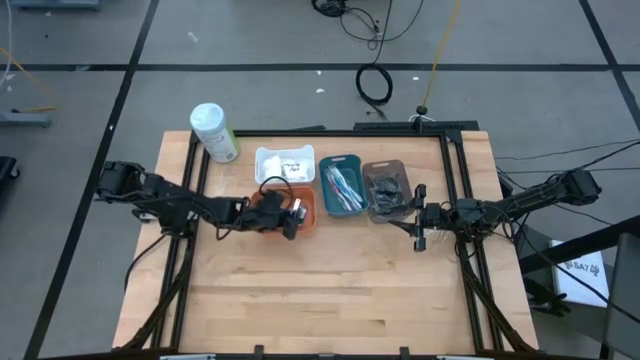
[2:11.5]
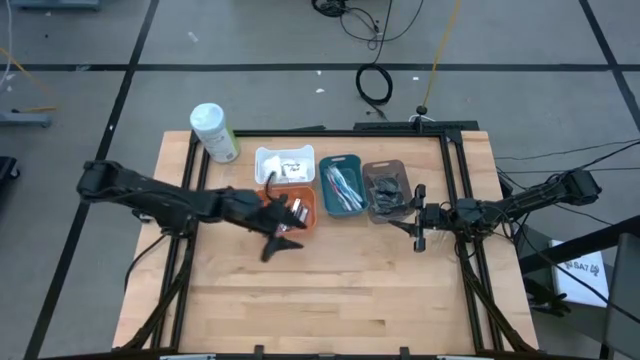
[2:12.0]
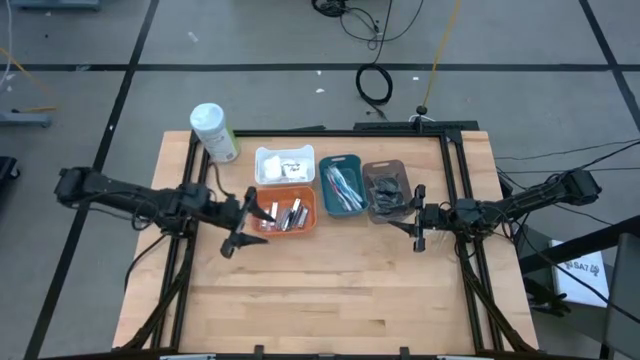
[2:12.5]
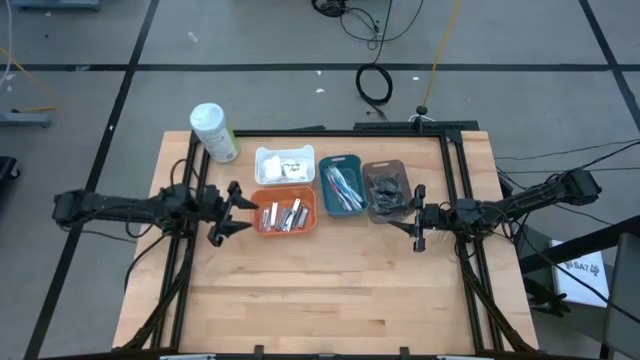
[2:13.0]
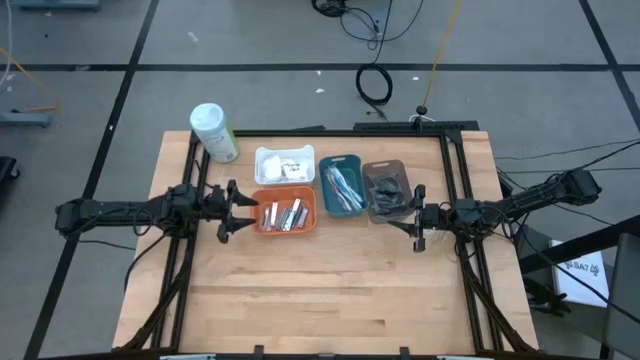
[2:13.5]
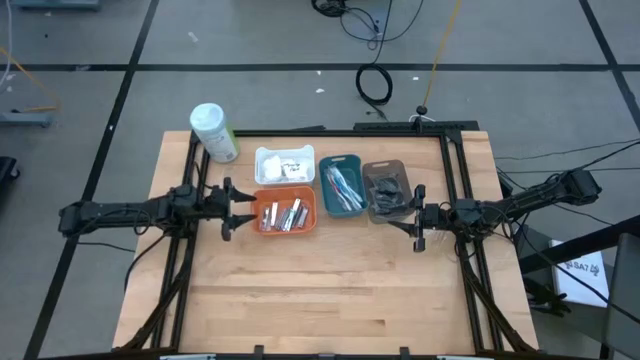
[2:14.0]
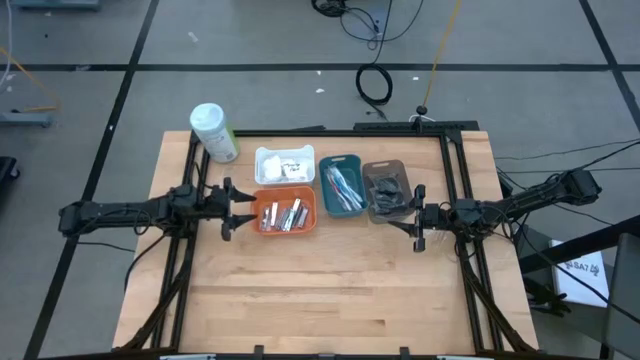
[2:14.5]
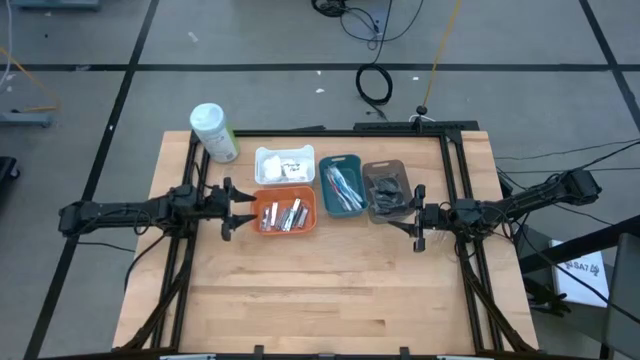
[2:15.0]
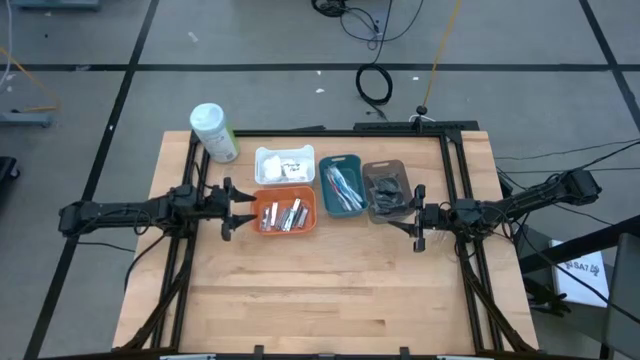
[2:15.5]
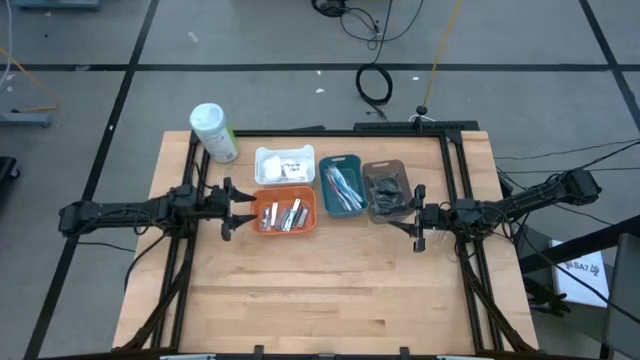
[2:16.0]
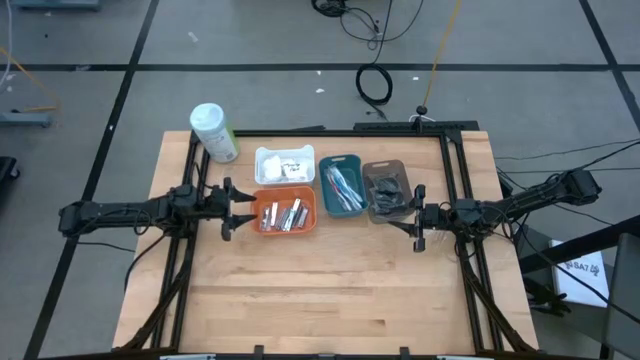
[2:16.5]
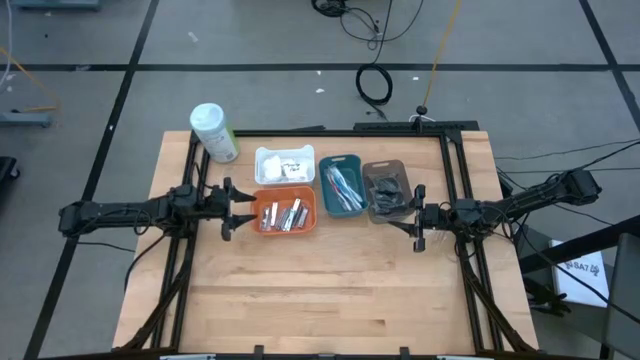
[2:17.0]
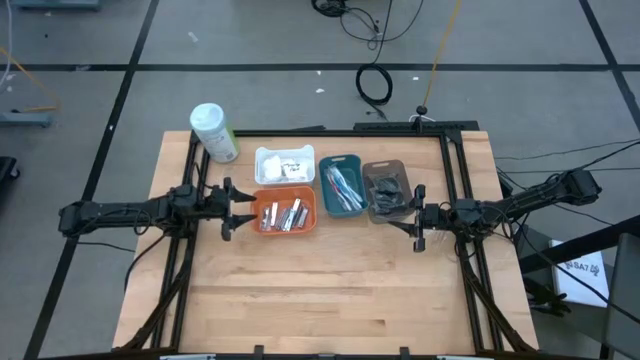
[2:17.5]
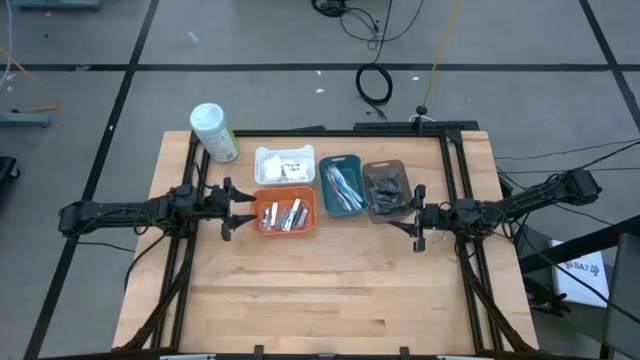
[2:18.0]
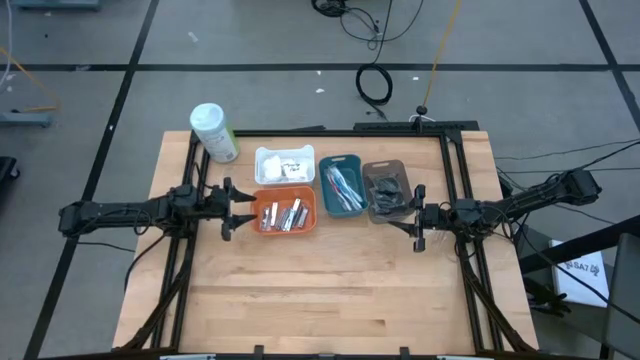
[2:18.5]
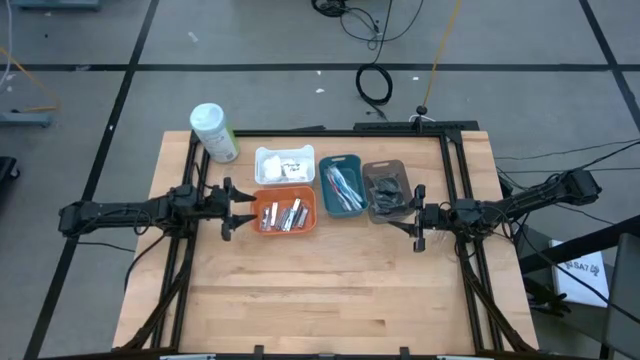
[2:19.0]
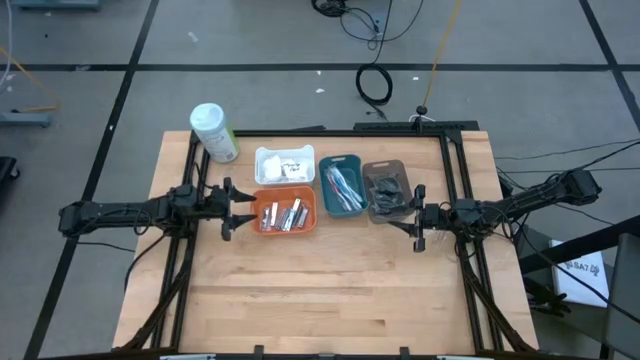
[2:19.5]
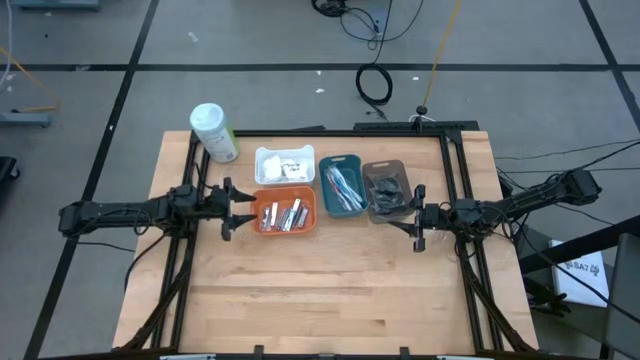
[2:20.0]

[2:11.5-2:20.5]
Task: Pick & Place Travel size toiletries
Return to Home Position

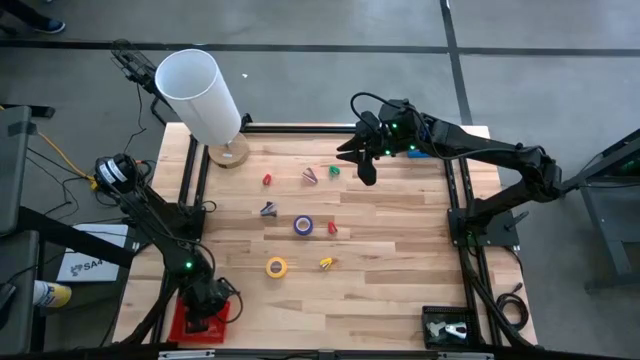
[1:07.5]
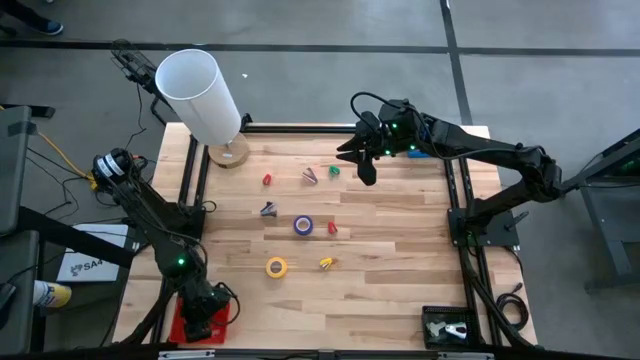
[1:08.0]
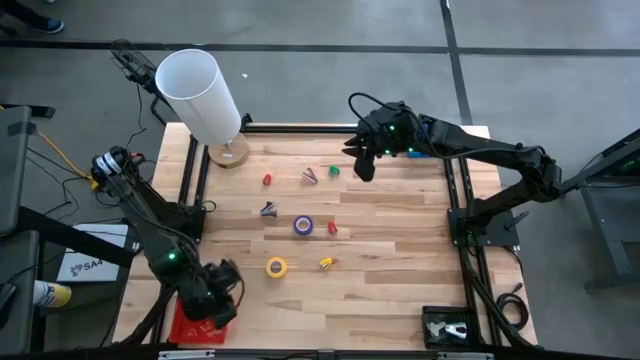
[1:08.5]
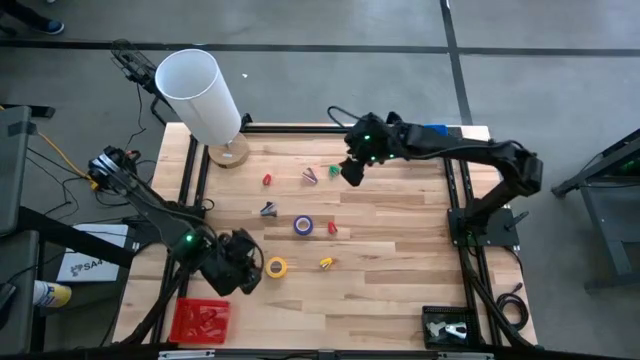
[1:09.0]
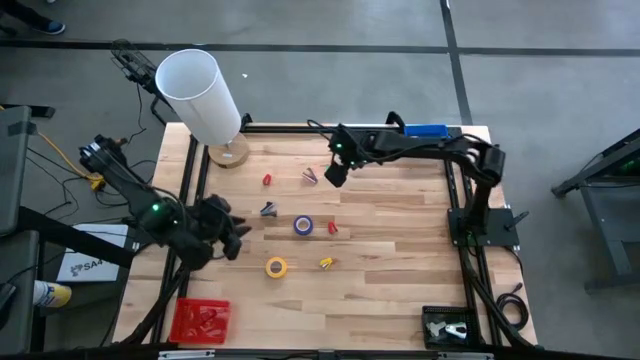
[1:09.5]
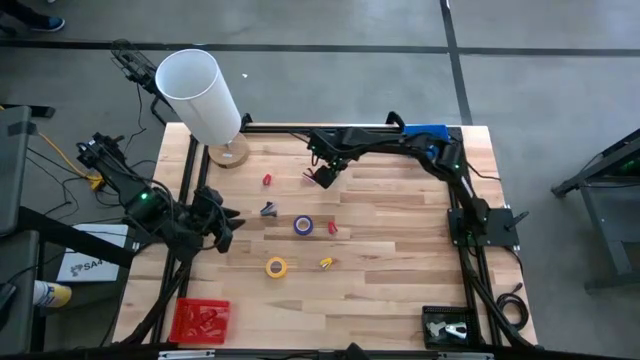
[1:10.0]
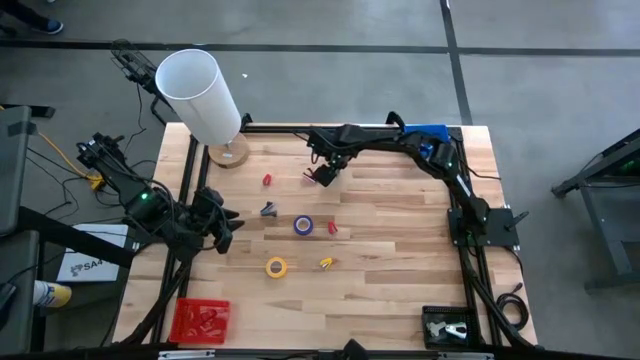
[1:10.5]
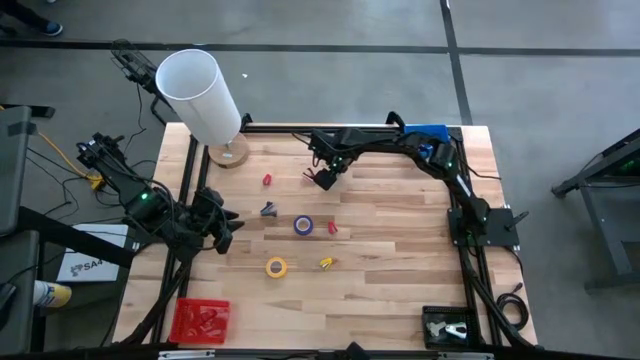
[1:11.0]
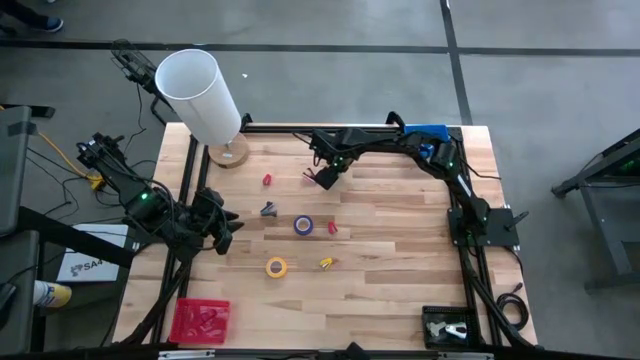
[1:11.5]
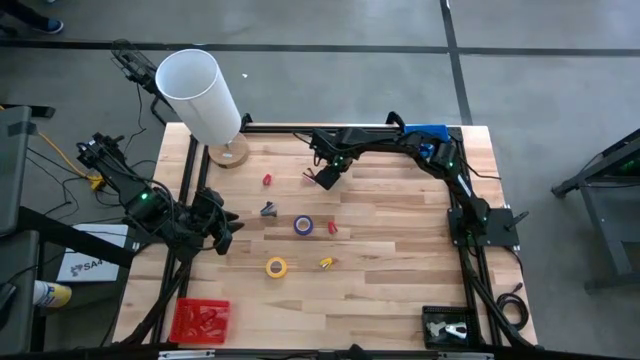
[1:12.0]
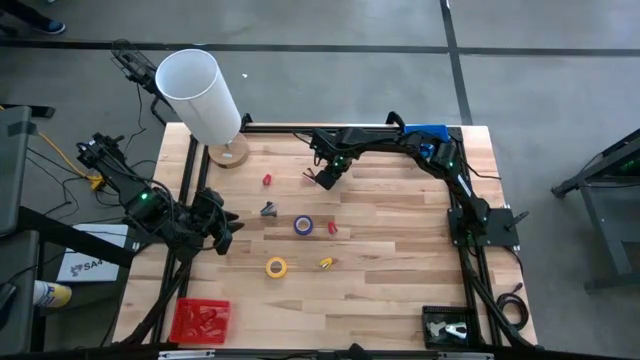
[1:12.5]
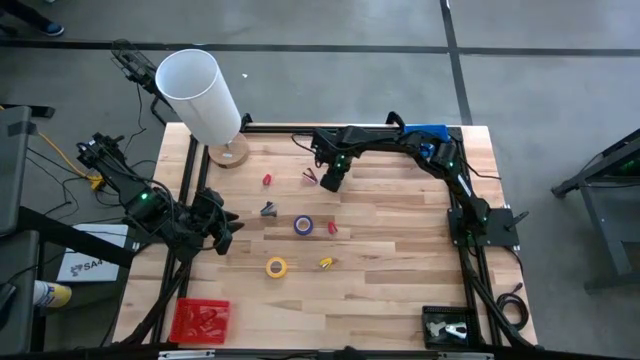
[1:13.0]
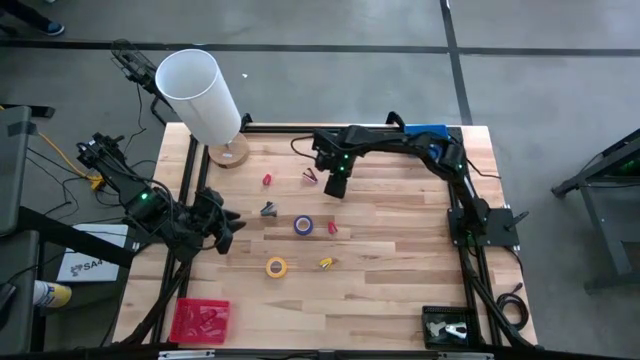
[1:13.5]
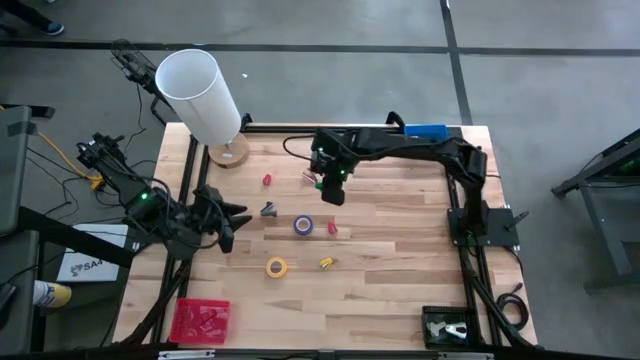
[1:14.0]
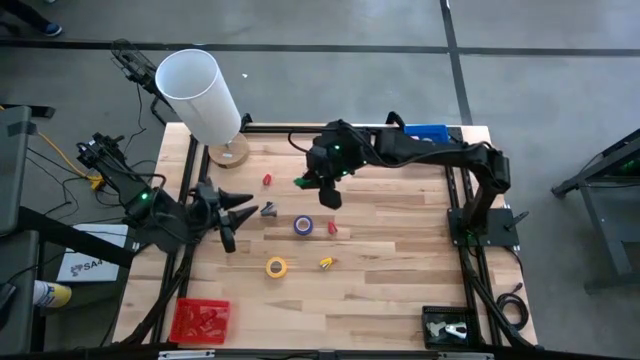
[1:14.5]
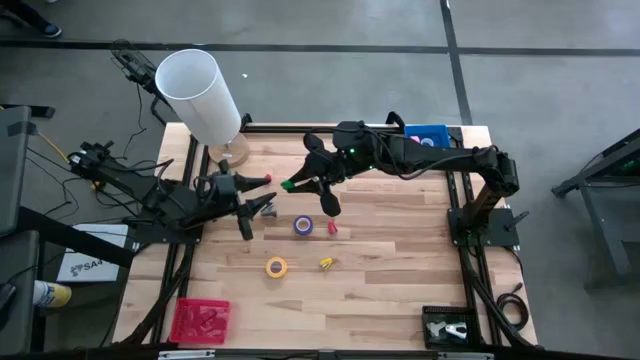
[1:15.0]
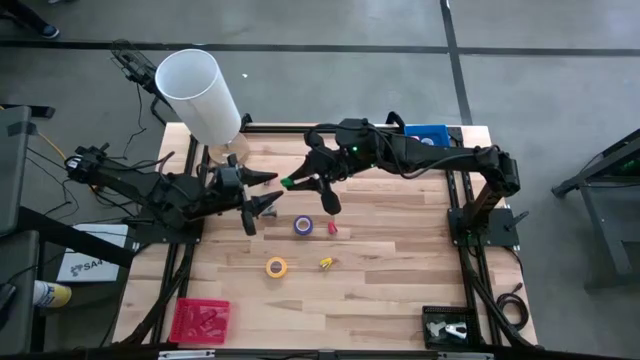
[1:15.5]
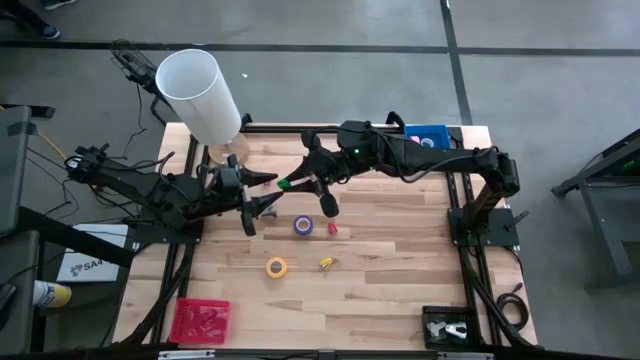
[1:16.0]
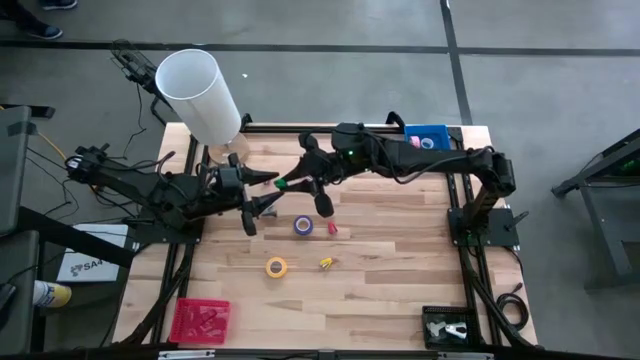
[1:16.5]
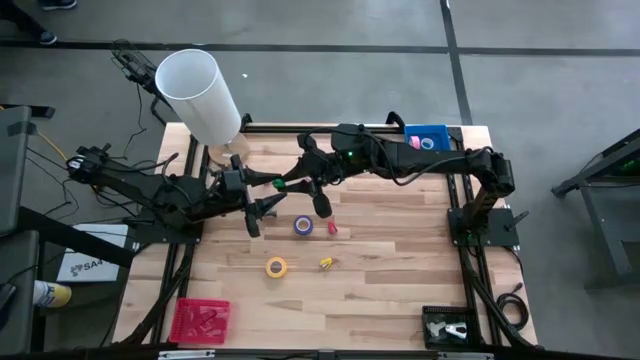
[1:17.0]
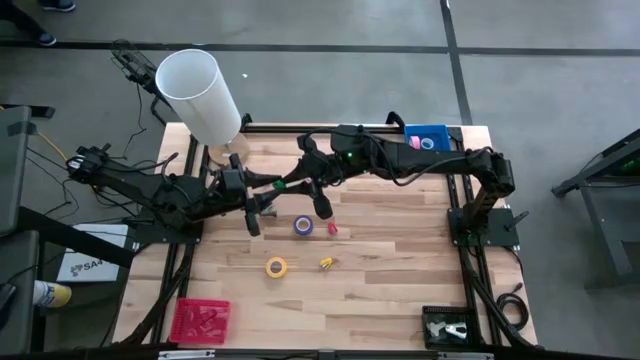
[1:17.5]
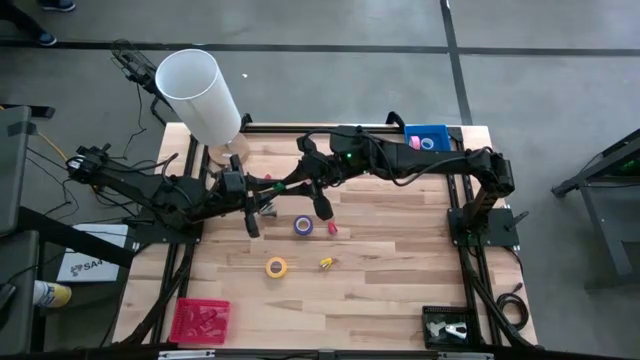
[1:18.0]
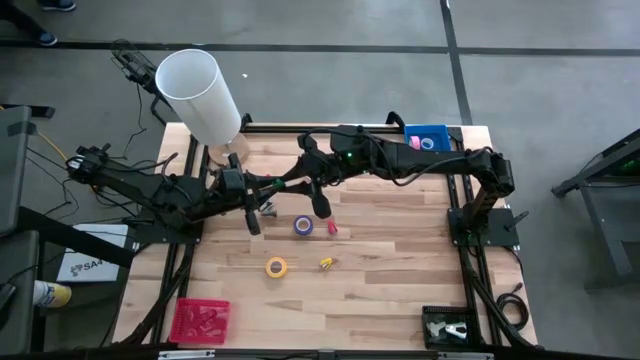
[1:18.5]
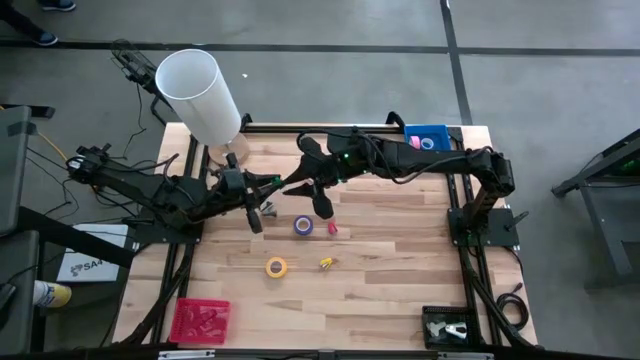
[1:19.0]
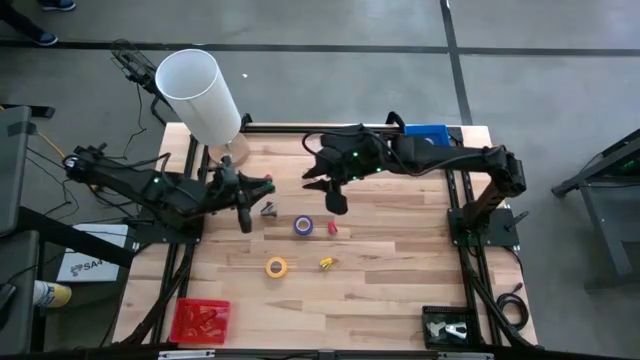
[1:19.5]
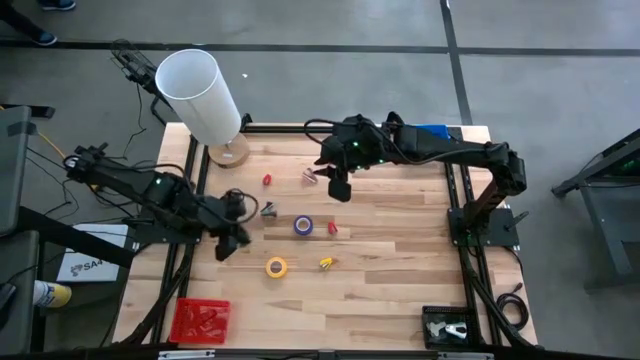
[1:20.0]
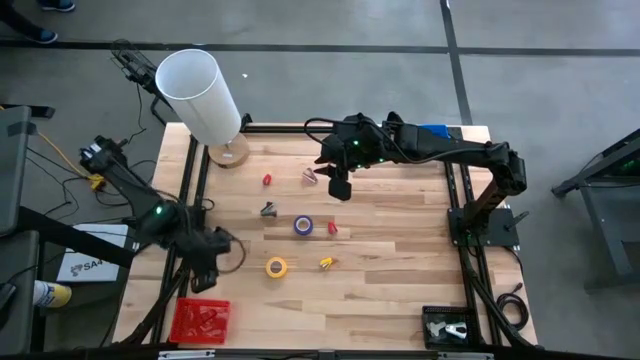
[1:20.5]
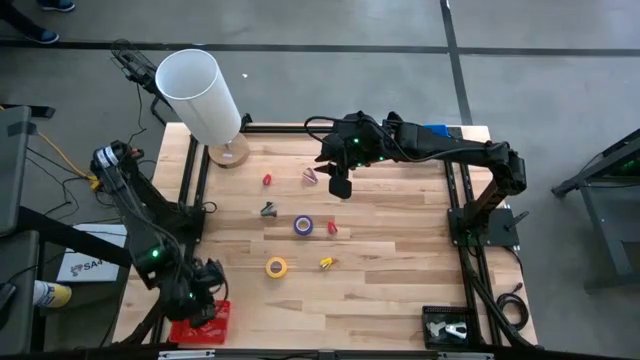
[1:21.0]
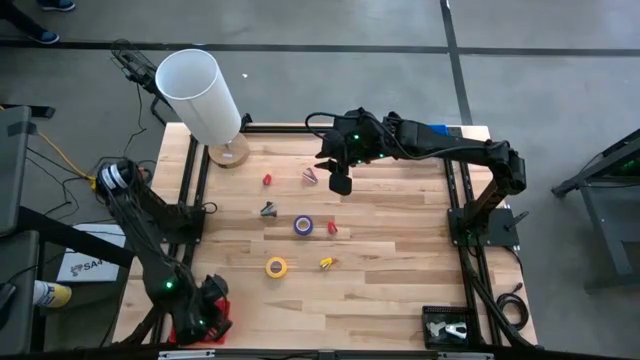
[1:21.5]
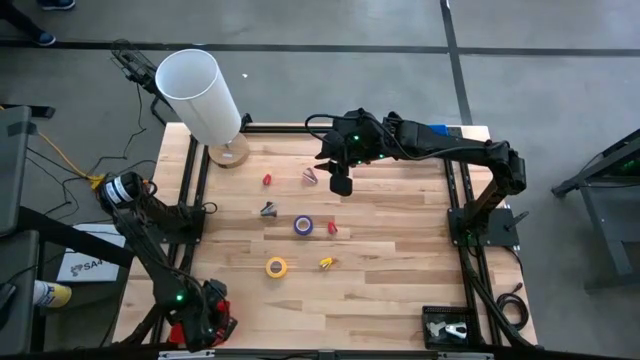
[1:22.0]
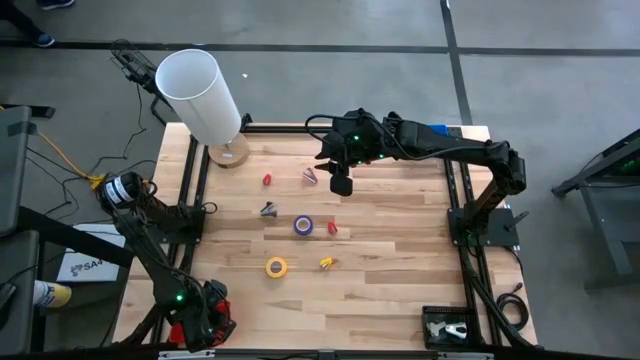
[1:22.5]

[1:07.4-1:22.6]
Task: Pick and place Stapler, Stapler remover, tape
Put the green stapler into the red bin
